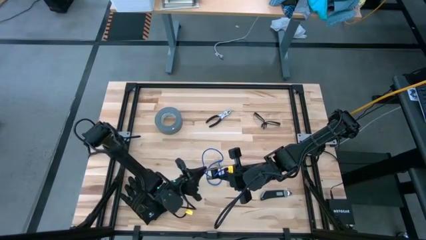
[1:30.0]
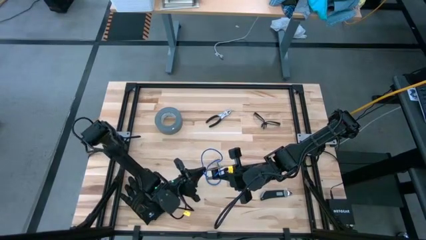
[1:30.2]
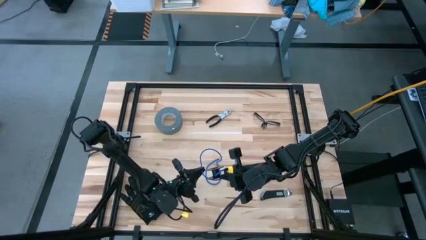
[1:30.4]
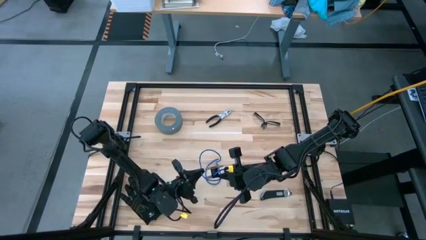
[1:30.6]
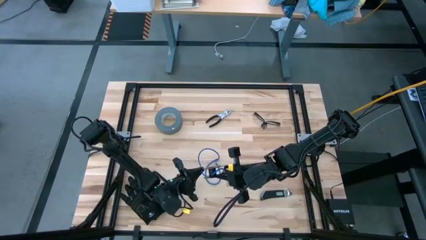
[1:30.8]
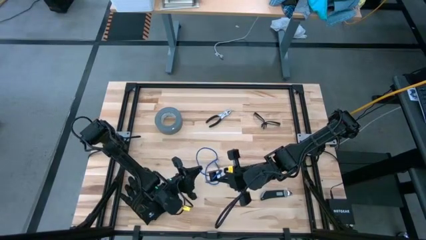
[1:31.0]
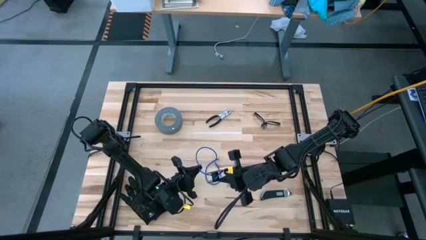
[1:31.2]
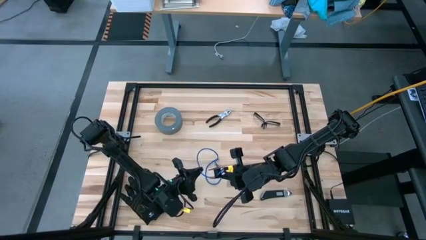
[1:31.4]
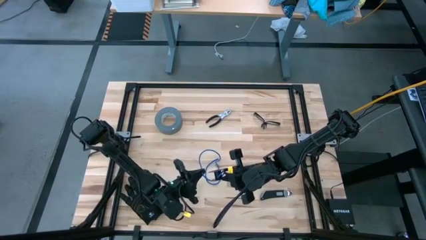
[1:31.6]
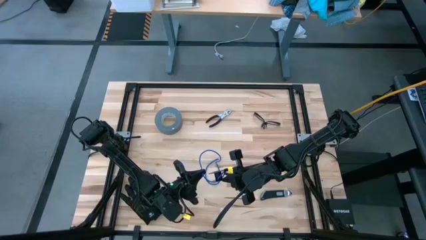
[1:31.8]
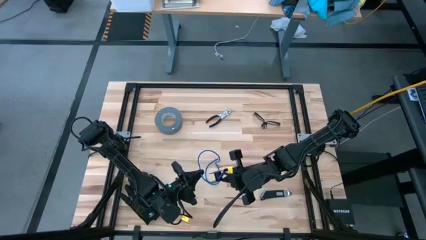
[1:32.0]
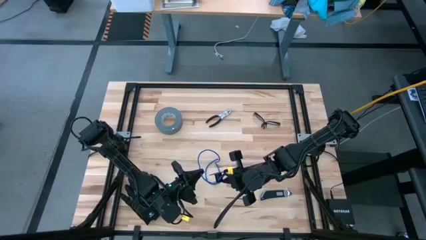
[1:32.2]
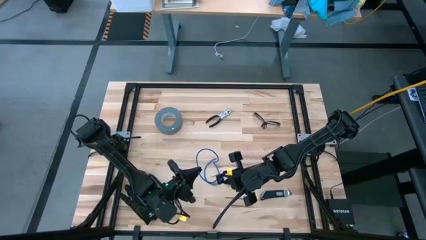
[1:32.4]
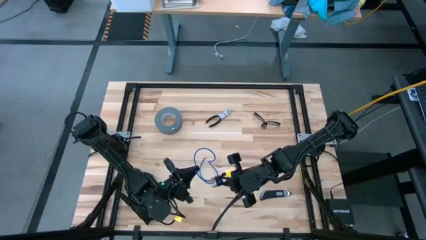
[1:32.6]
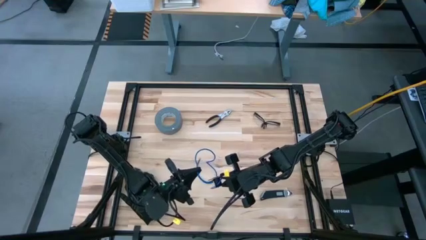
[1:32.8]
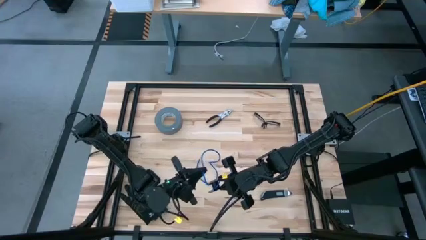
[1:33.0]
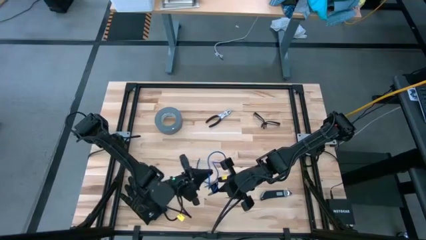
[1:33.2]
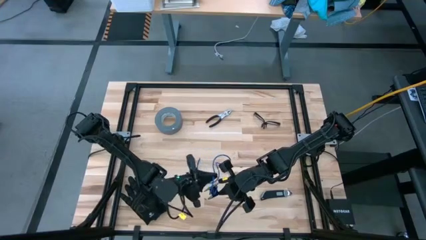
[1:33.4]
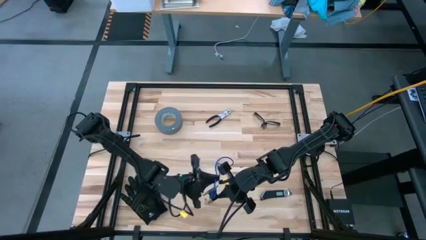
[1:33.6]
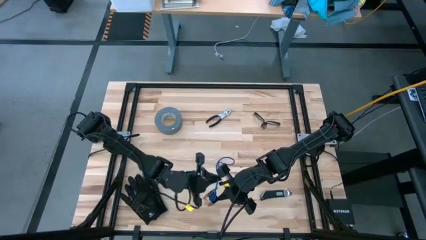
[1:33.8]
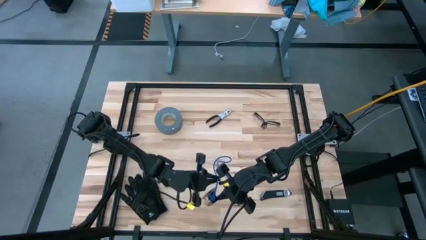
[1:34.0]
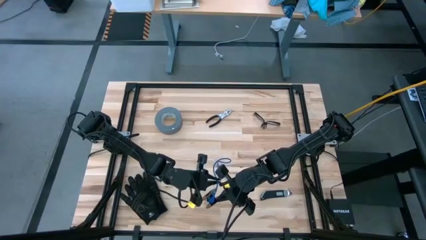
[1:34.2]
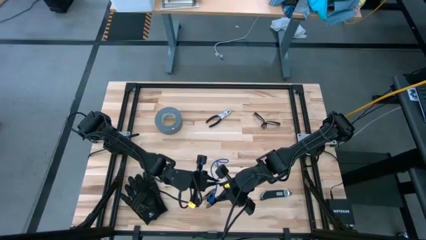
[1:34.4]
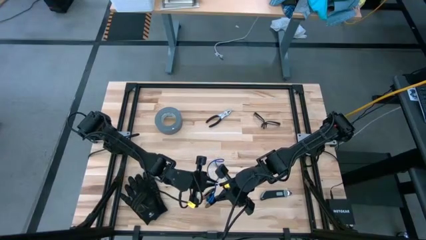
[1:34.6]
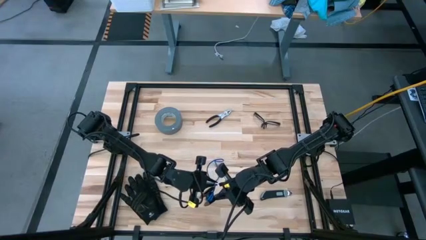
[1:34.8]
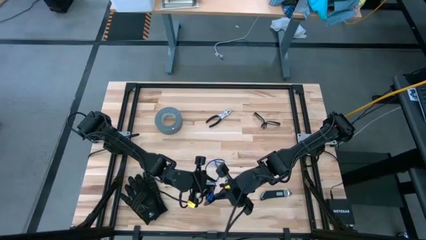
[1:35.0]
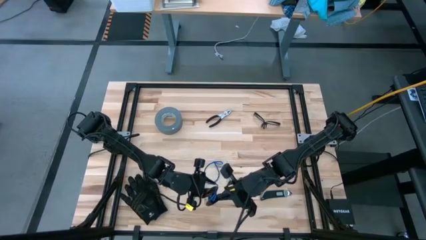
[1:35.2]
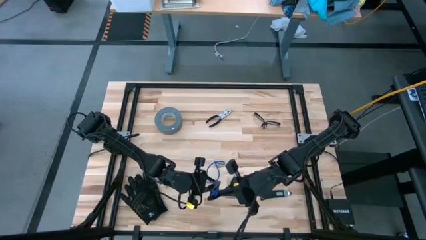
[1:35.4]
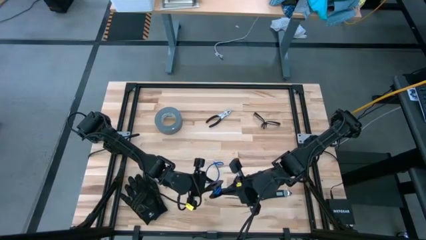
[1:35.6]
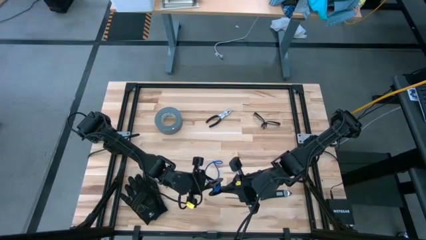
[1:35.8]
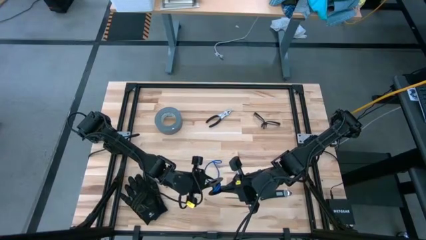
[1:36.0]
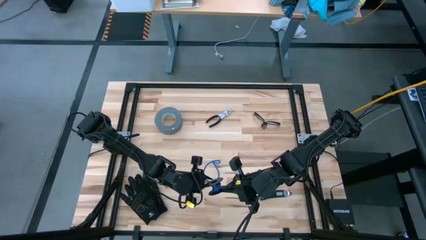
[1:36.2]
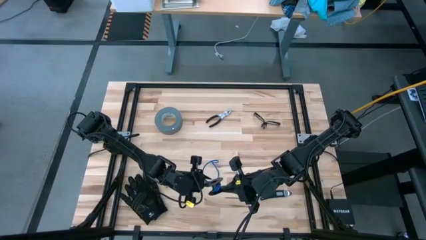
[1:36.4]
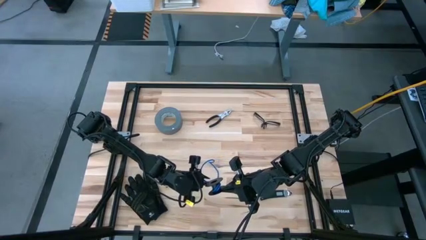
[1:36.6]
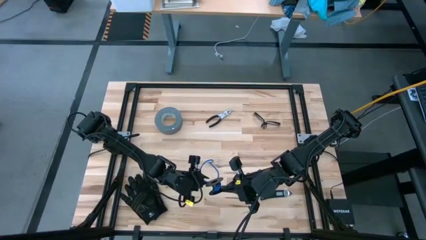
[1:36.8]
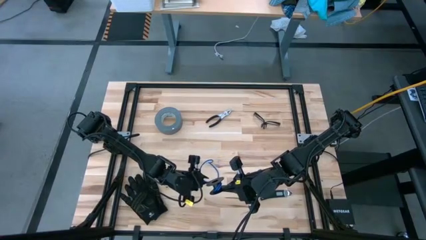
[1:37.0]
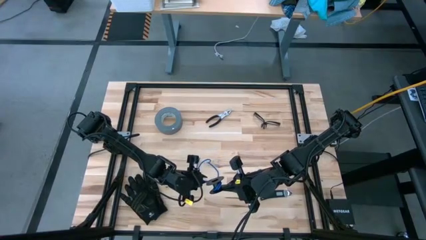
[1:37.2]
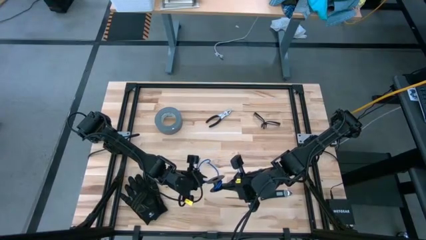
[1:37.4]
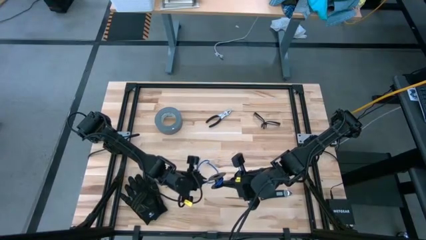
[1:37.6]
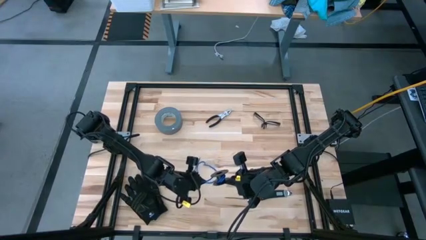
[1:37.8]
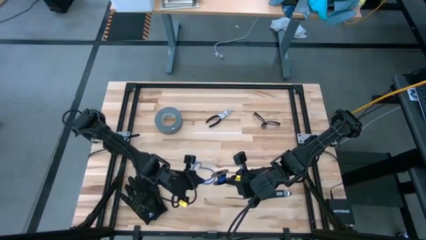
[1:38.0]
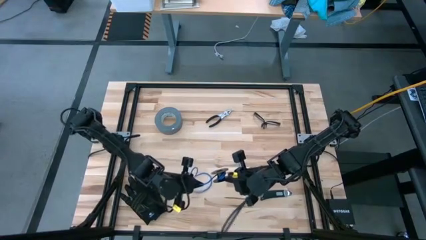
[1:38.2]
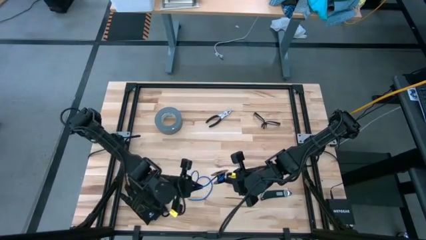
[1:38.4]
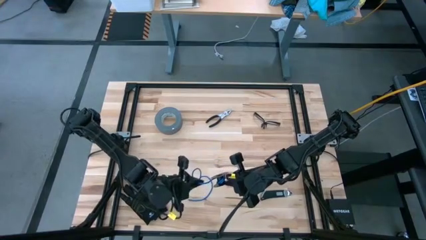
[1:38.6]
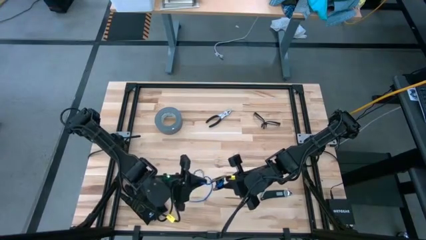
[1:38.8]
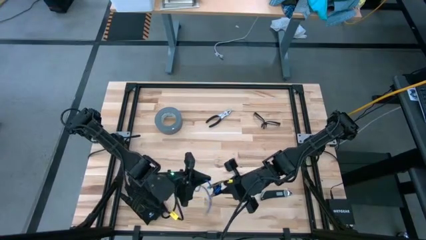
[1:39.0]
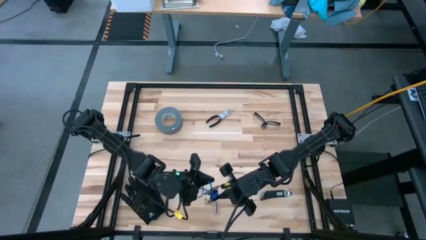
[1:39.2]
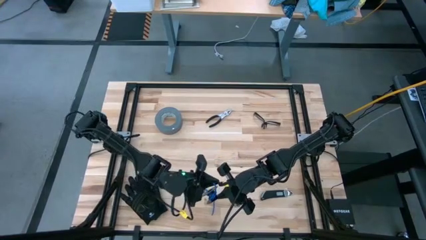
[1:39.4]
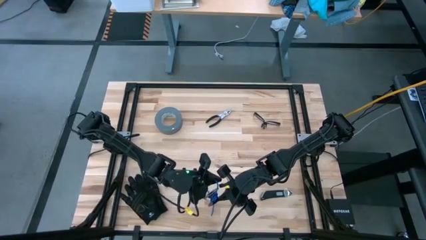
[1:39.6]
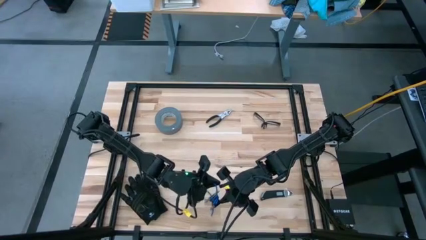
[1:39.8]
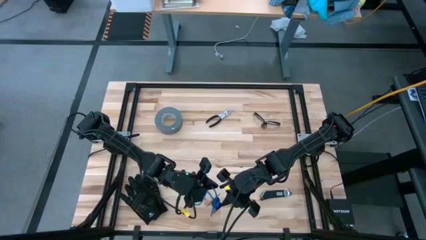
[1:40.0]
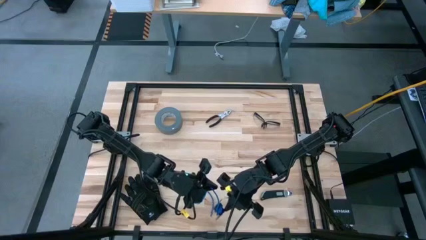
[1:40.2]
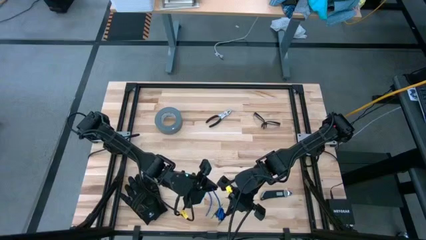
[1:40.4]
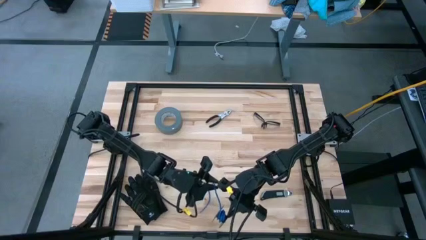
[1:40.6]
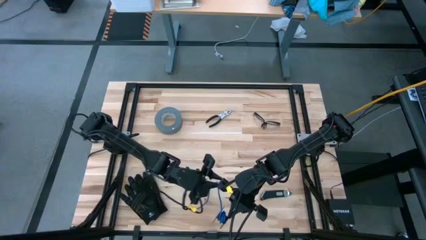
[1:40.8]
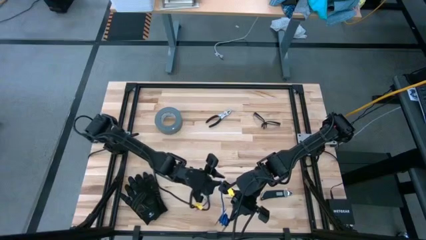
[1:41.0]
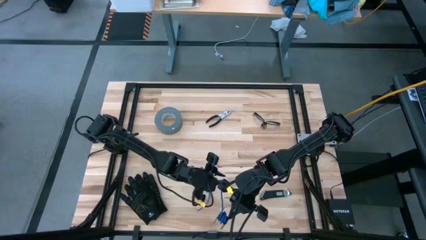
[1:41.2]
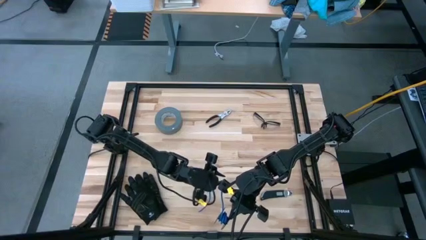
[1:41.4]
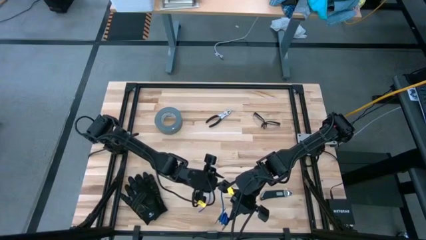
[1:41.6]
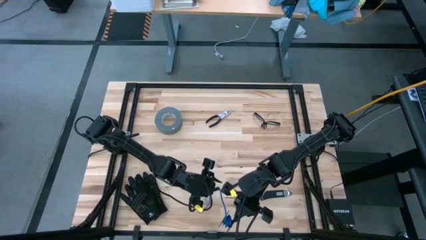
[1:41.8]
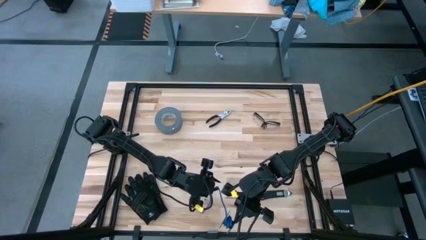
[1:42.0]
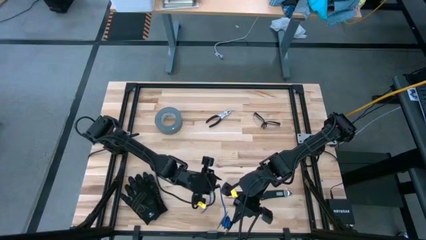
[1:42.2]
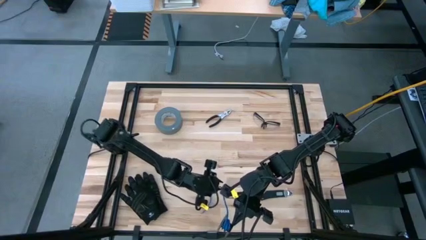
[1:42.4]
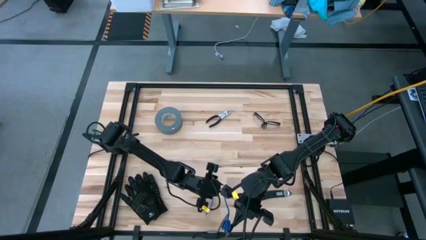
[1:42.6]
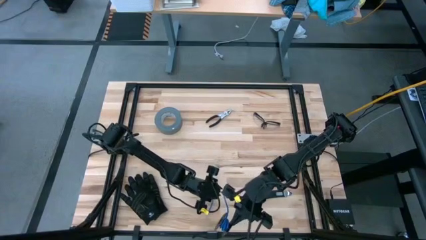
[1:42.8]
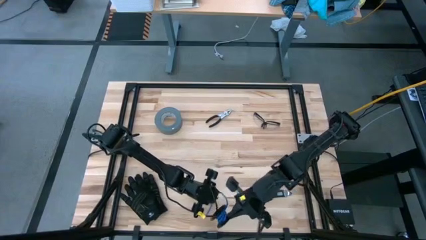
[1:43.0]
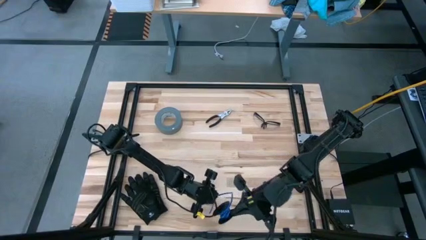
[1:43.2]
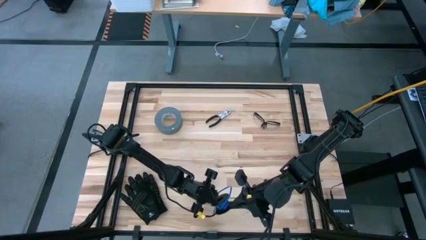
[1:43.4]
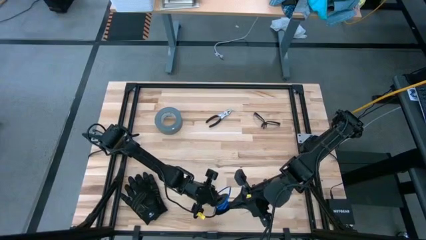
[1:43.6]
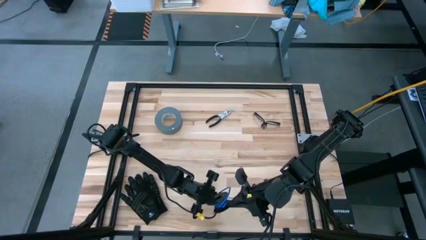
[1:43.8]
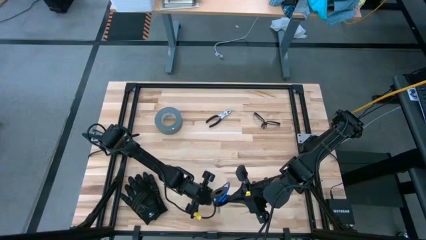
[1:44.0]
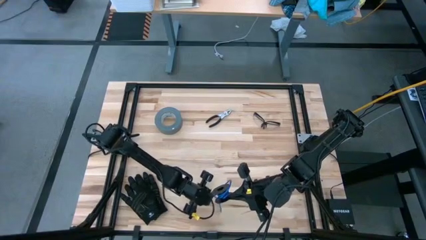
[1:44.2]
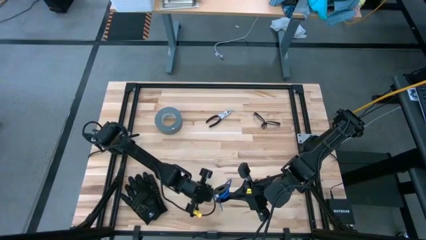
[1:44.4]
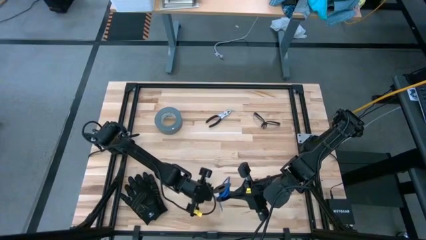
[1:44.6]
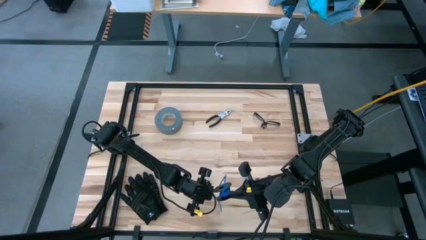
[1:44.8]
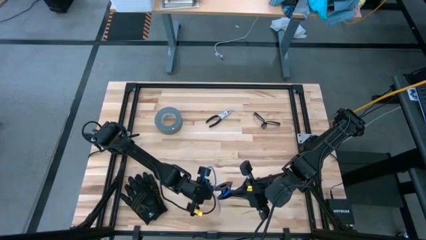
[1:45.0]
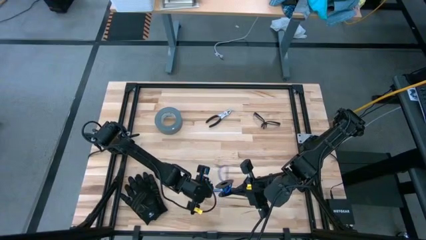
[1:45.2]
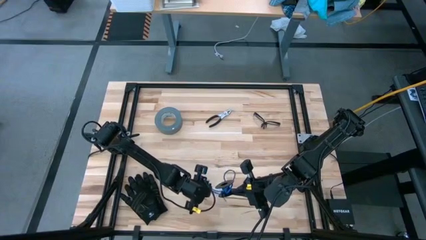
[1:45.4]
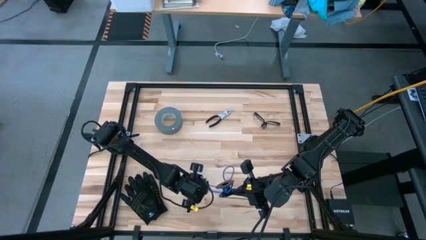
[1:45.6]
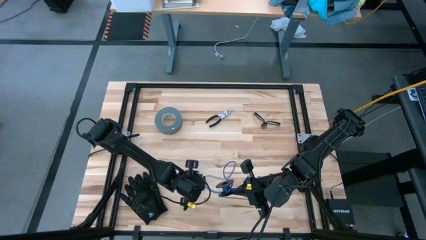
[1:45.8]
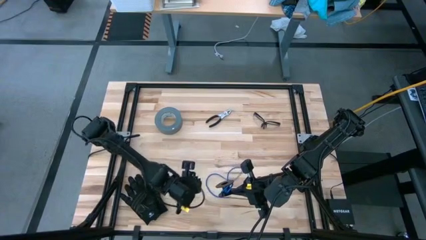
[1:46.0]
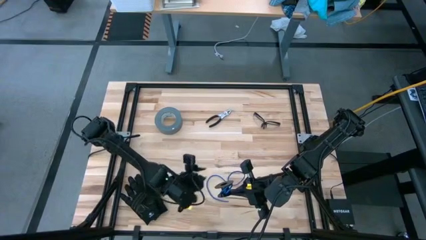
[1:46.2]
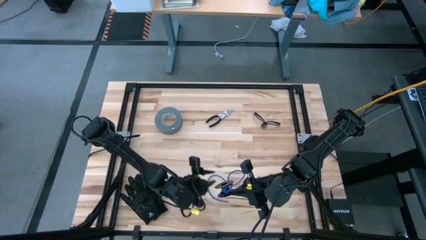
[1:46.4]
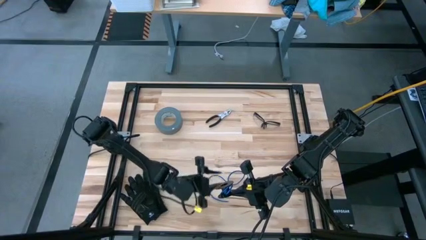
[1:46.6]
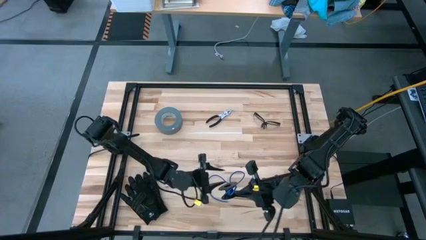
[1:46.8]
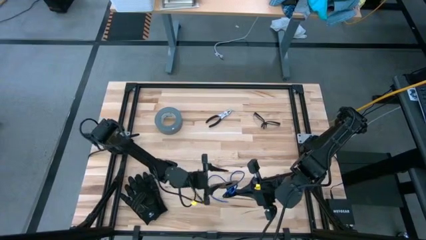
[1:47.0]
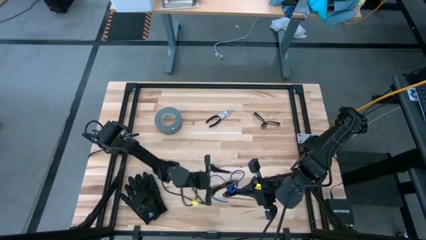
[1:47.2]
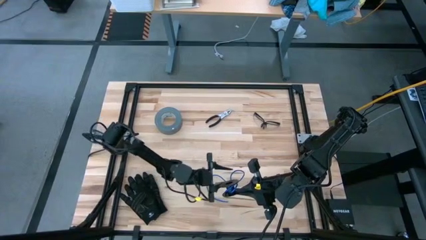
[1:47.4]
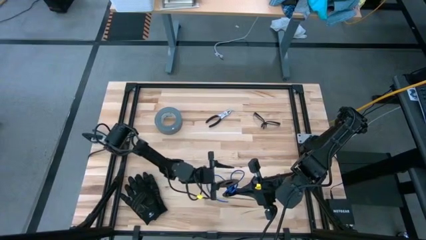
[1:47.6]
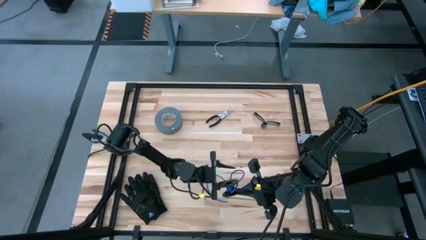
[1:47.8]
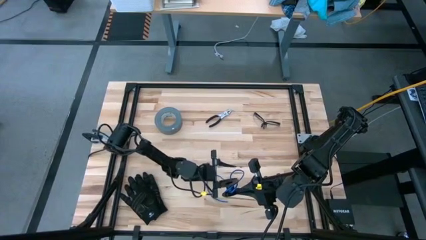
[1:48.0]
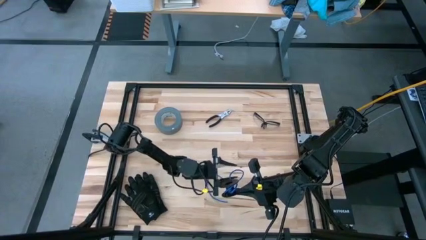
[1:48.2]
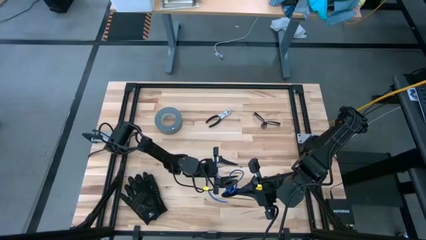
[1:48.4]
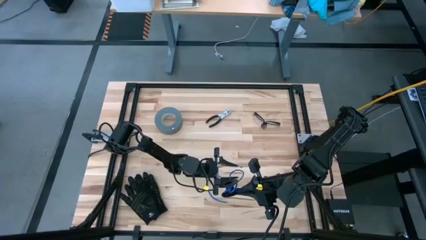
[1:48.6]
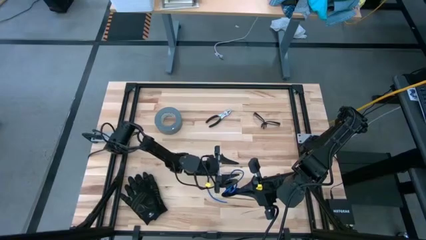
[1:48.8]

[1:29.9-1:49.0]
Task: Coil cords
Coil the blue wire cable onto the black spool
